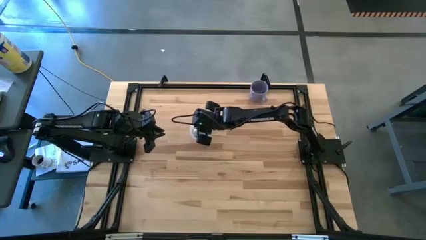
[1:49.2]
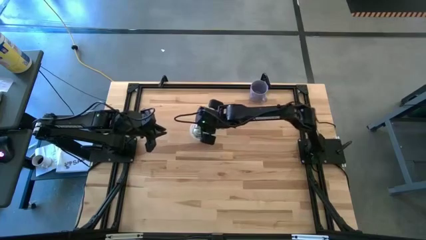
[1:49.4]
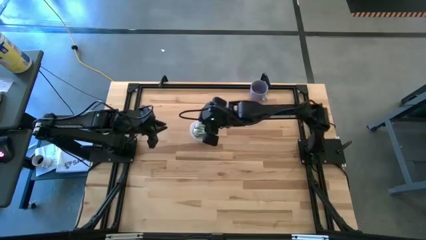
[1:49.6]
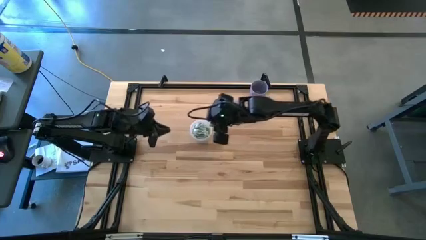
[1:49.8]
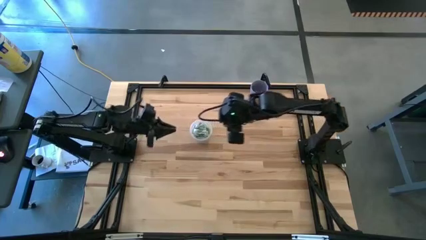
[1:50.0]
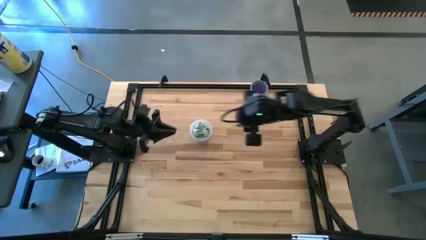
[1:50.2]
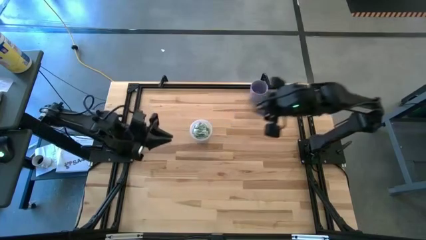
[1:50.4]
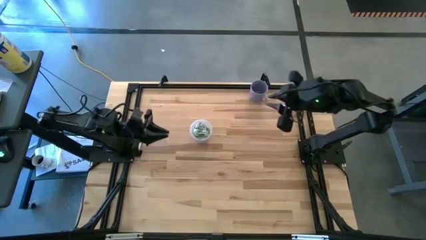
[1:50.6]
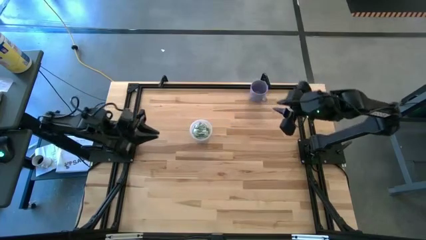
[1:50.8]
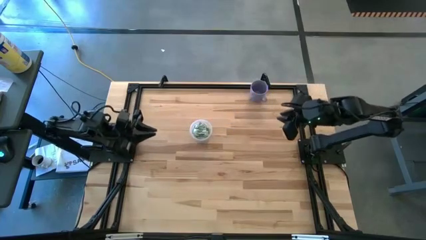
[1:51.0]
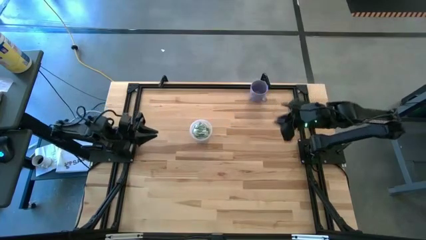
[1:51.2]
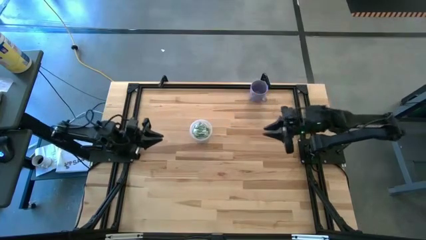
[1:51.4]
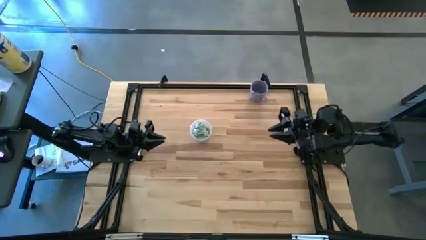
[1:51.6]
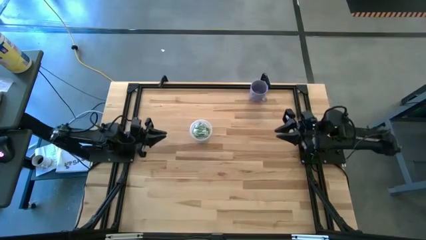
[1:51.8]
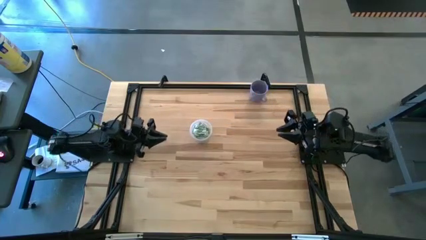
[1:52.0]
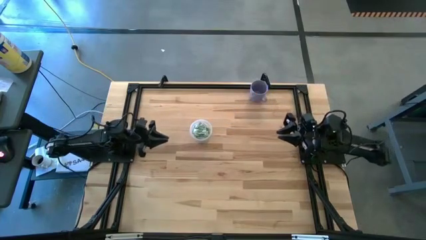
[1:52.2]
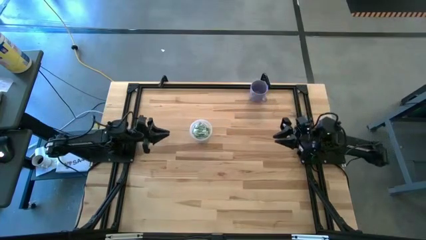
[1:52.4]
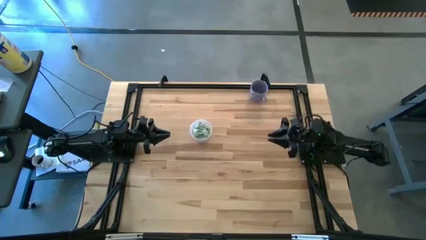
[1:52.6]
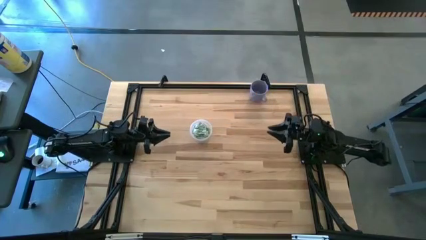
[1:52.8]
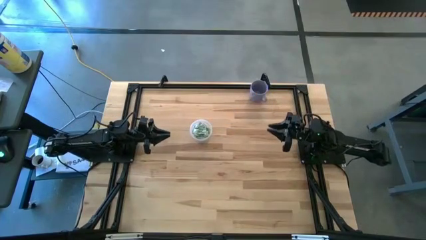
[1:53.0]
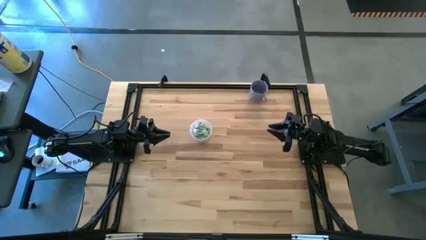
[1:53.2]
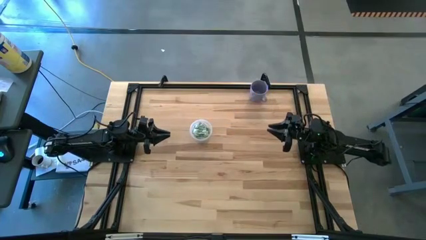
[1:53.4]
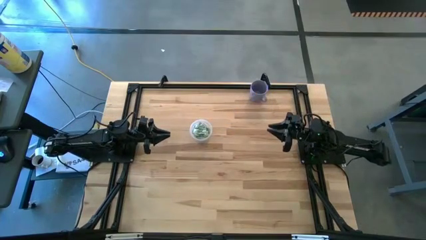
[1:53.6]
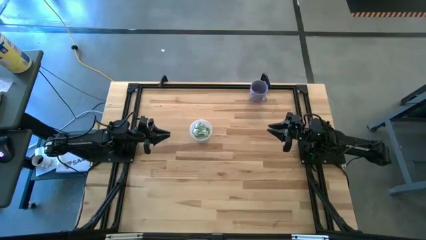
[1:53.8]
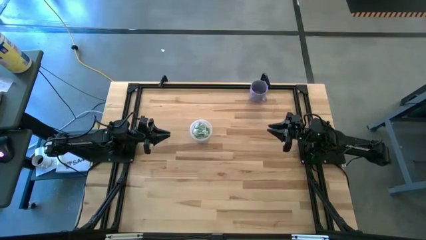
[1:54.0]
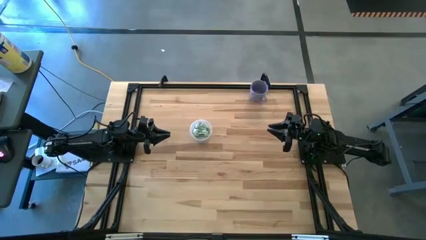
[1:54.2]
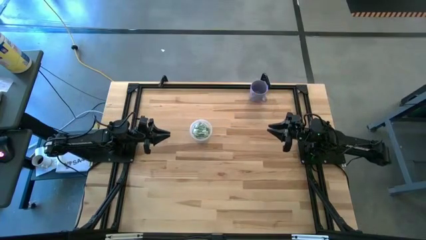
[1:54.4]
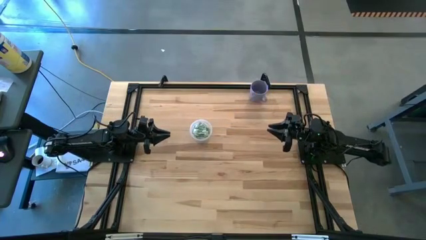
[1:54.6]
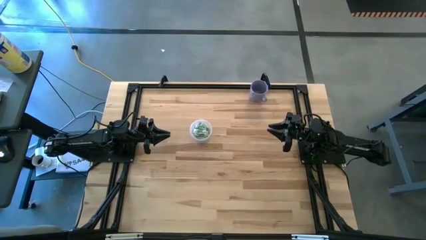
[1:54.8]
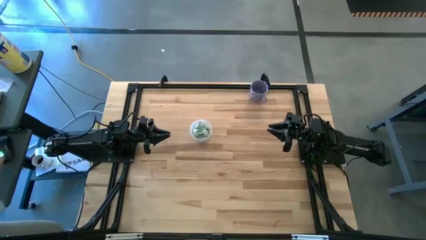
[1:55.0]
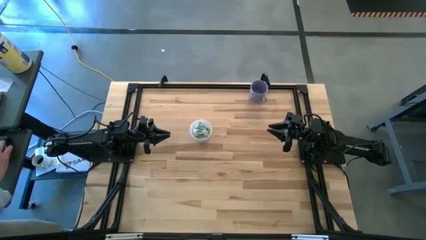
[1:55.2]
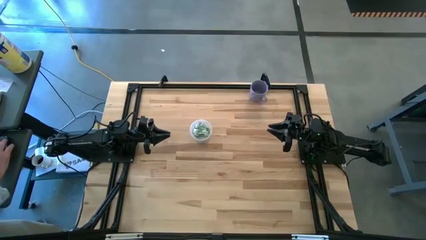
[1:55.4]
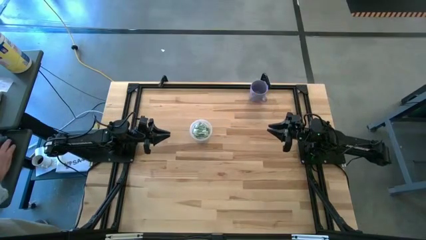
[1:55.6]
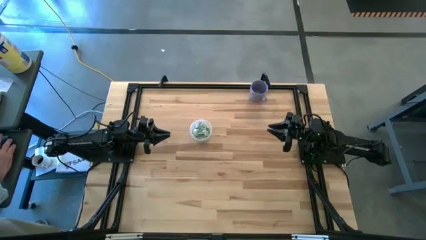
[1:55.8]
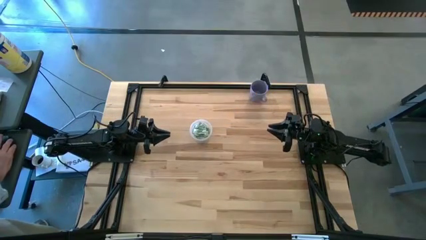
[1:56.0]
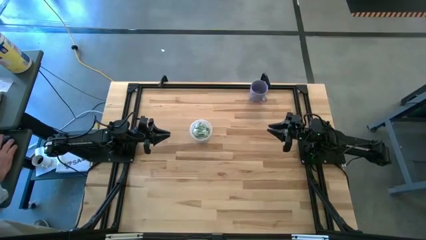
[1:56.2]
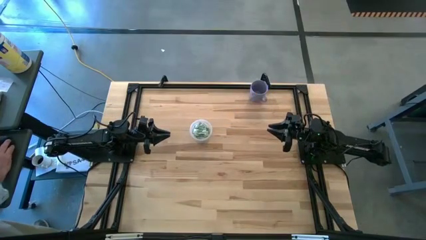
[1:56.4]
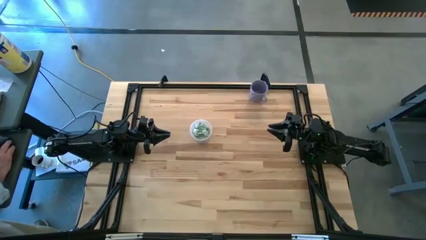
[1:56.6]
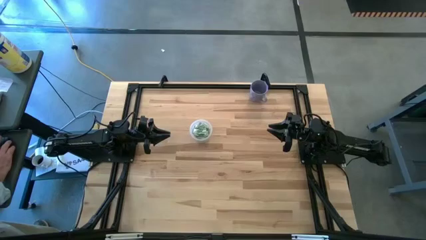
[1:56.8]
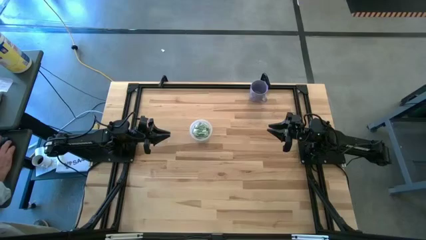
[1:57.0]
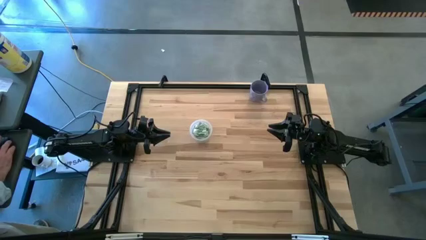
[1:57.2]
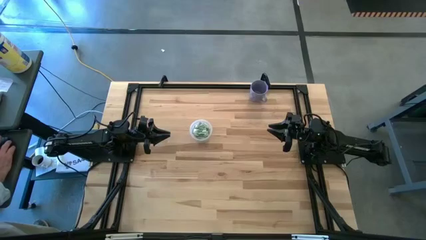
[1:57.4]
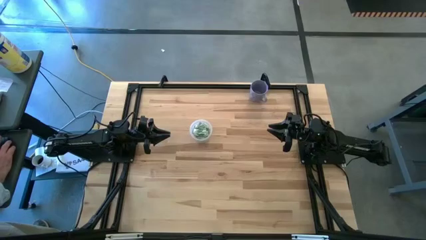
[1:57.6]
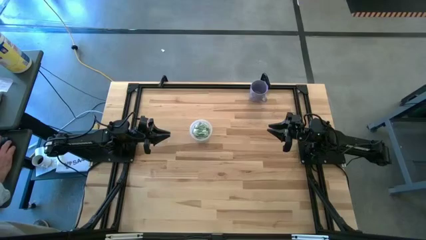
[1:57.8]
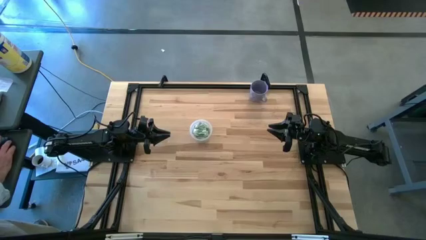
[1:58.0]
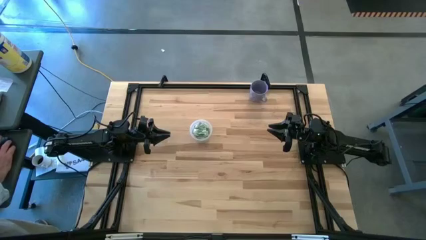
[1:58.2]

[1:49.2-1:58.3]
Task: Pick and place Stevia / Truvia into bins
Return to Home Position

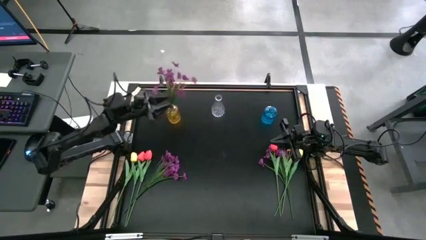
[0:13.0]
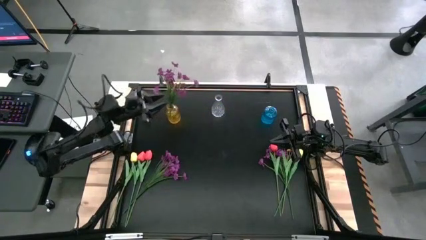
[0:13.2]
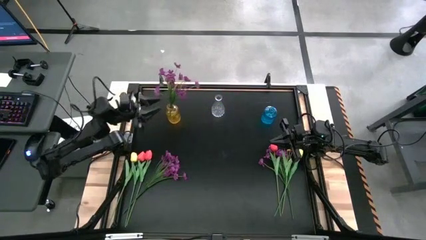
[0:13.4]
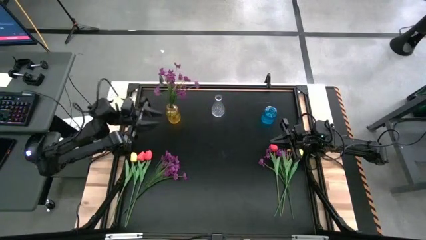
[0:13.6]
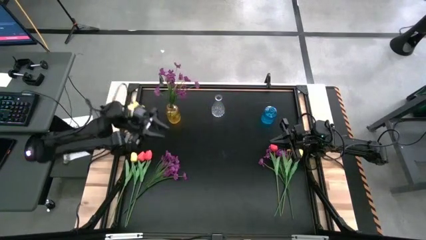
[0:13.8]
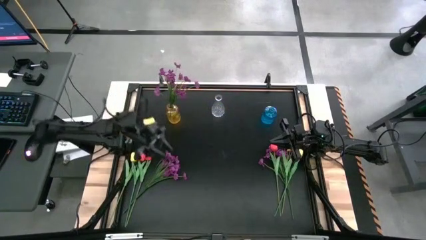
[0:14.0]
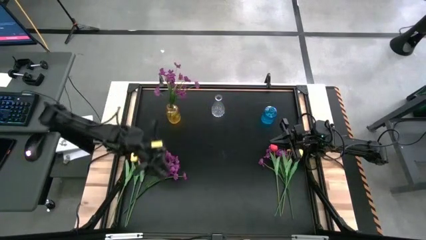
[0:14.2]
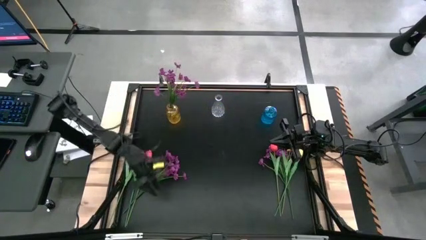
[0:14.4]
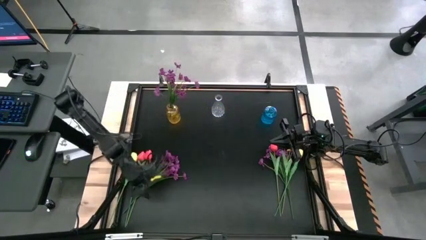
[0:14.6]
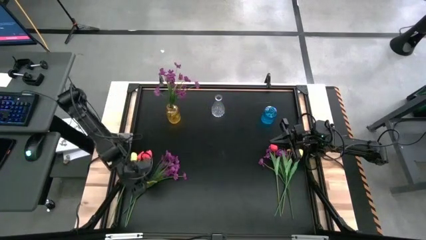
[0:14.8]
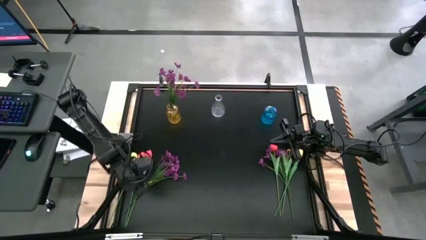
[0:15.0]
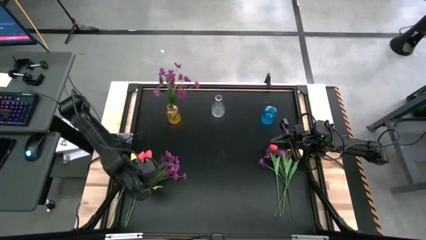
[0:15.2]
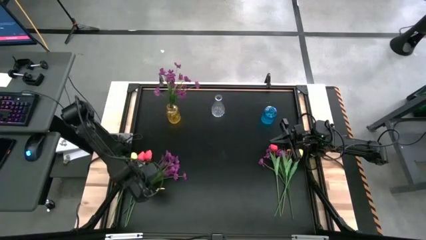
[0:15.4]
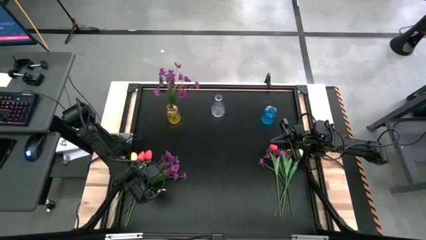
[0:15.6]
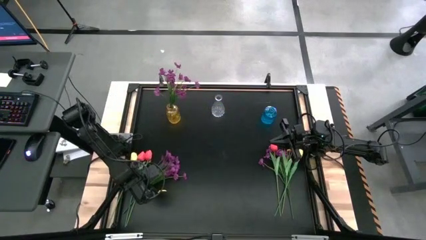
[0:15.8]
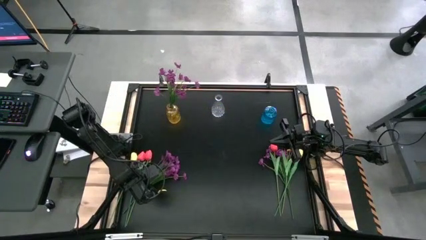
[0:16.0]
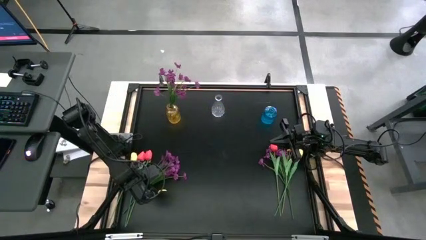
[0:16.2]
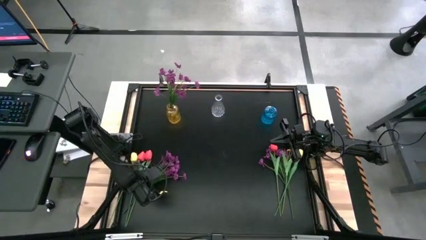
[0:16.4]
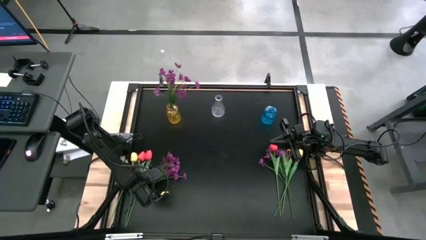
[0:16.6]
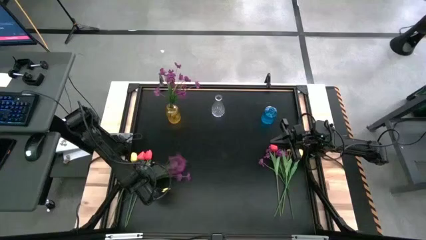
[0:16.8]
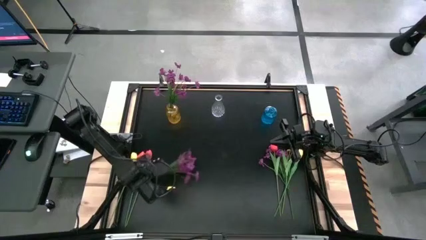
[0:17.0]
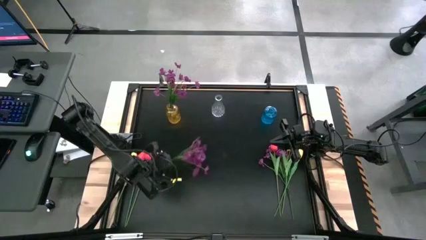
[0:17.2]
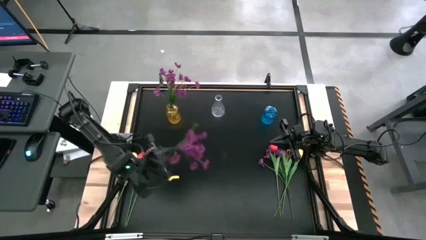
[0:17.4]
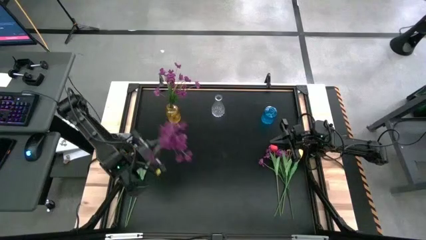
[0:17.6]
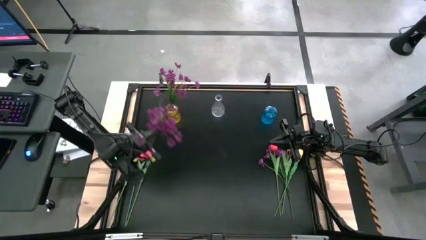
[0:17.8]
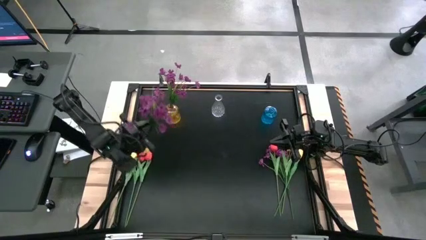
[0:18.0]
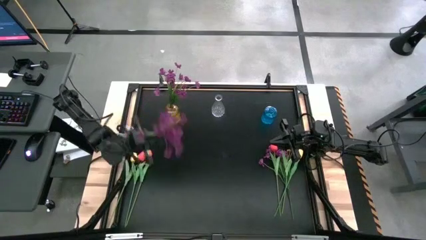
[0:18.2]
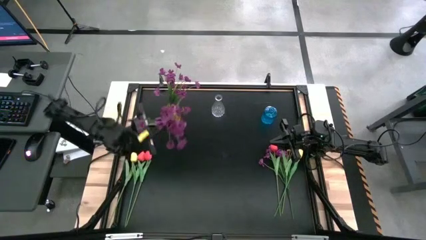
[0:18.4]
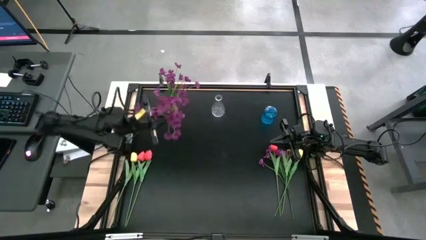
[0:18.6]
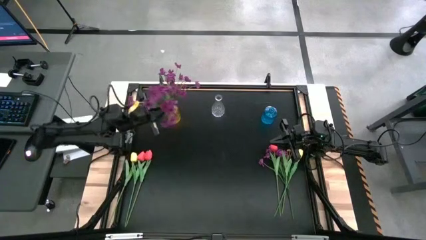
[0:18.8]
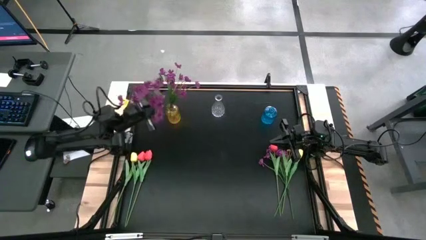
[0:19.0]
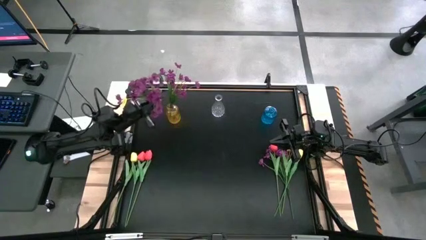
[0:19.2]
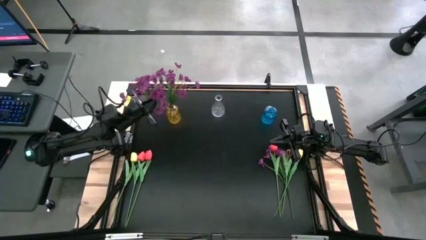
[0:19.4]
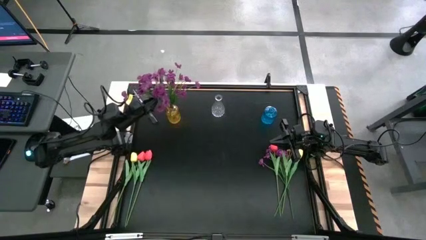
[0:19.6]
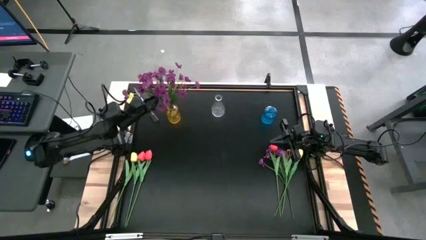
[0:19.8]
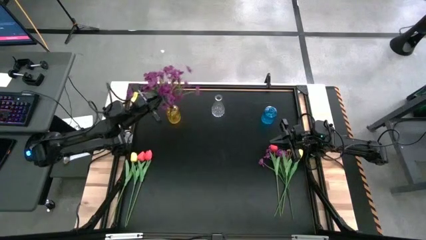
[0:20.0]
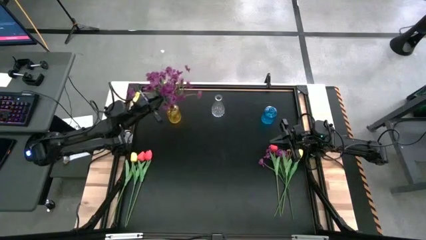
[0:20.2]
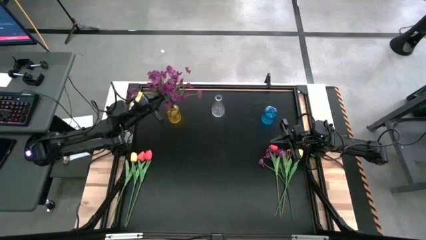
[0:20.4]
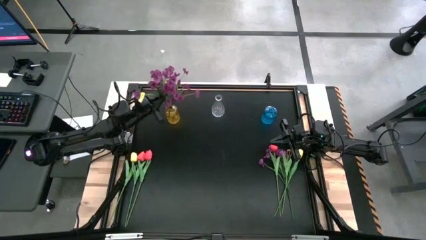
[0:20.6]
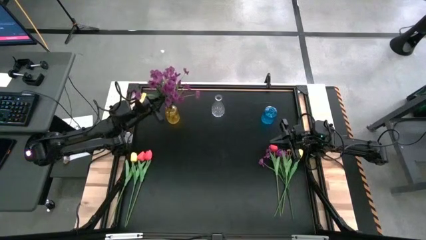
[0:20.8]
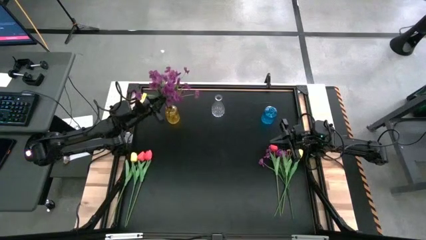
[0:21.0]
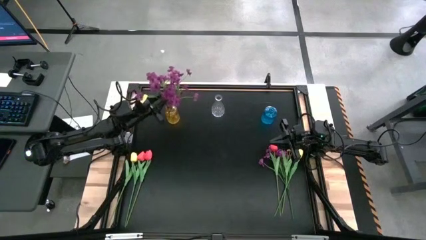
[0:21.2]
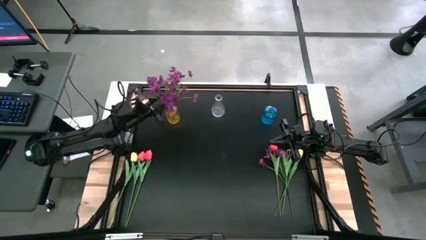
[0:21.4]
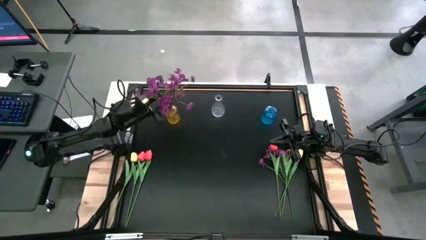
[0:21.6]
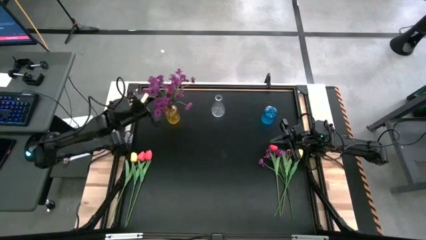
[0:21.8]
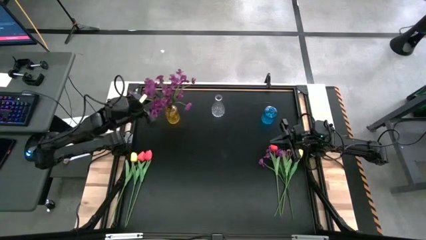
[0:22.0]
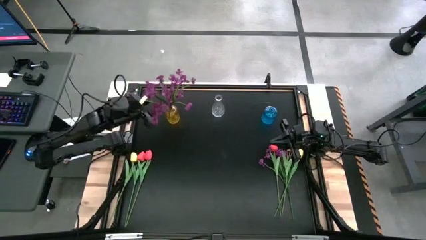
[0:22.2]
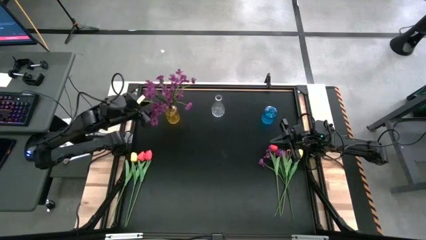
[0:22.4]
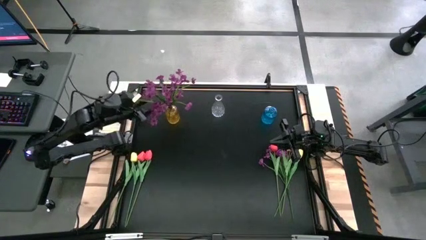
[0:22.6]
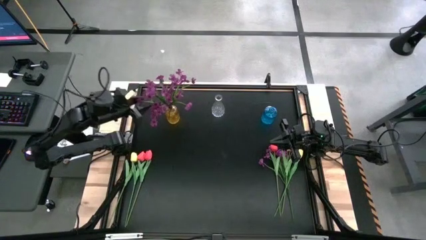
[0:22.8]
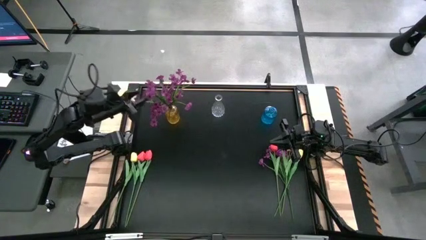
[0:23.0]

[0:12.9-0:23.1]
Task: Sort flowers into vase by color
Put the left purple flowers into the yellow flower vase
